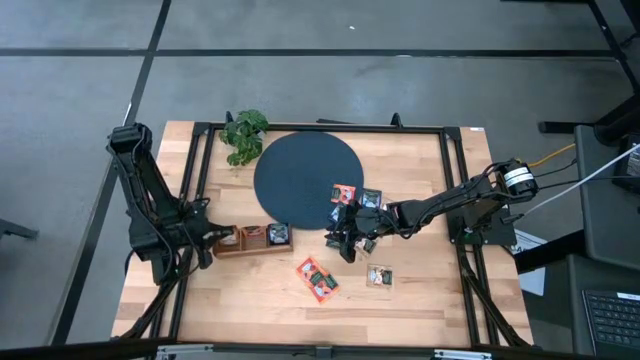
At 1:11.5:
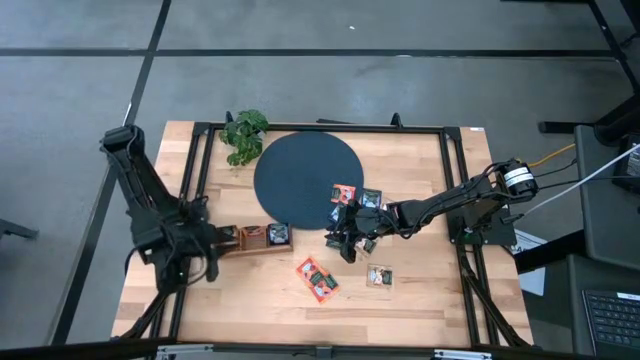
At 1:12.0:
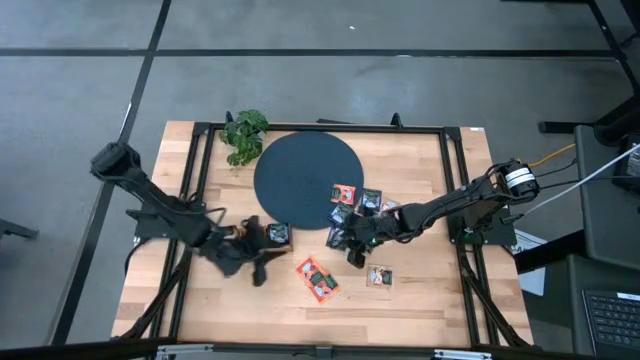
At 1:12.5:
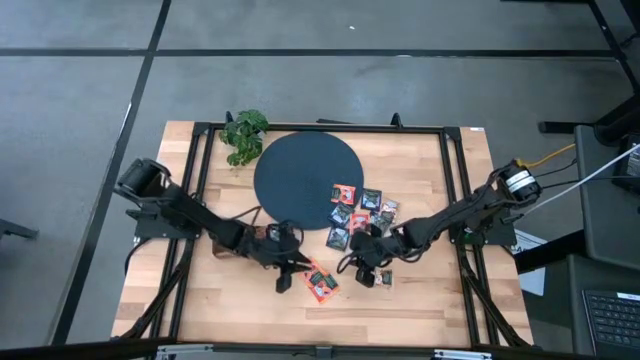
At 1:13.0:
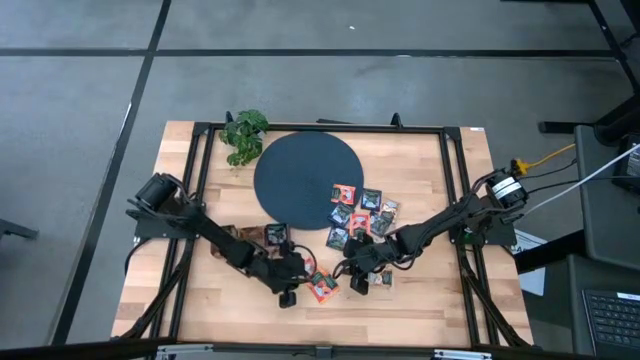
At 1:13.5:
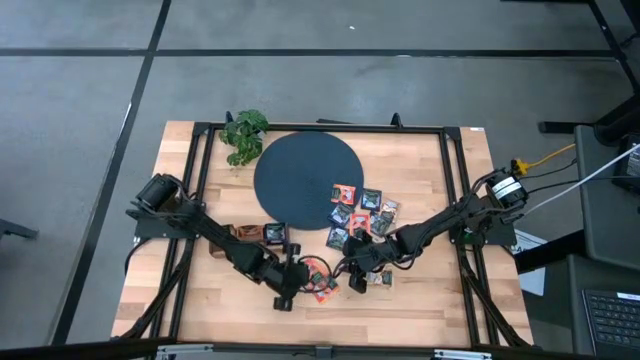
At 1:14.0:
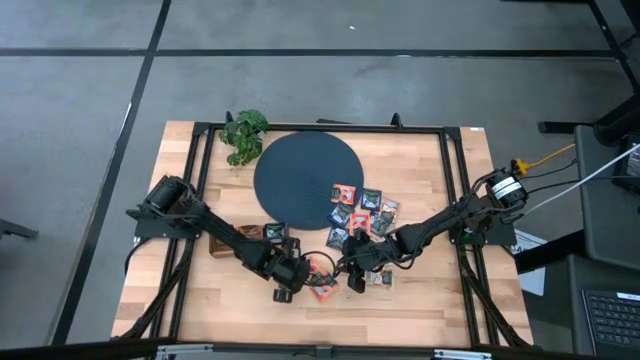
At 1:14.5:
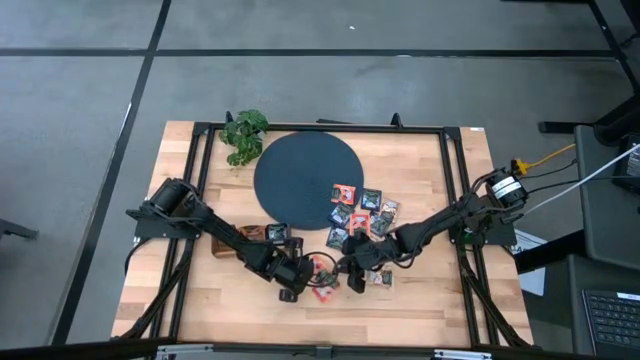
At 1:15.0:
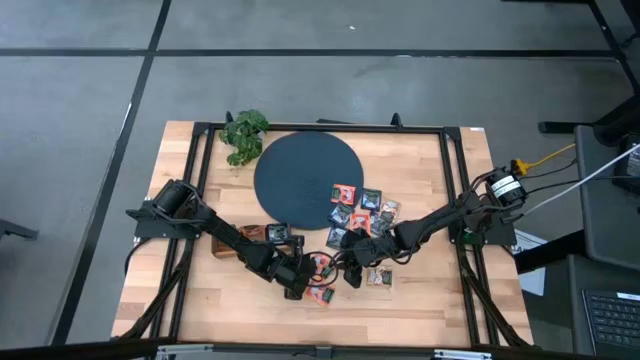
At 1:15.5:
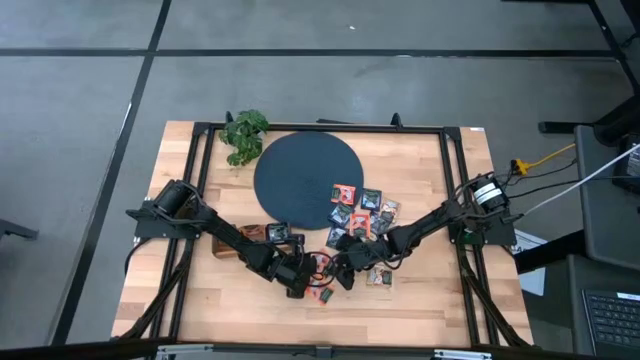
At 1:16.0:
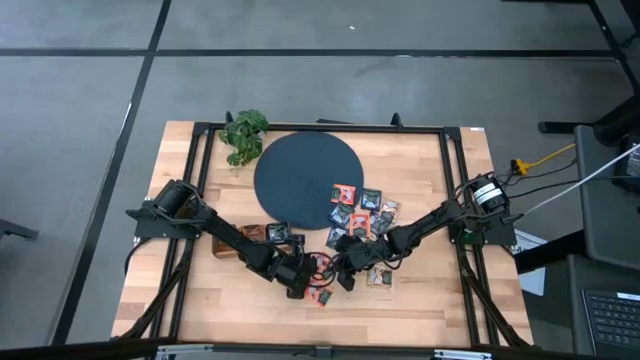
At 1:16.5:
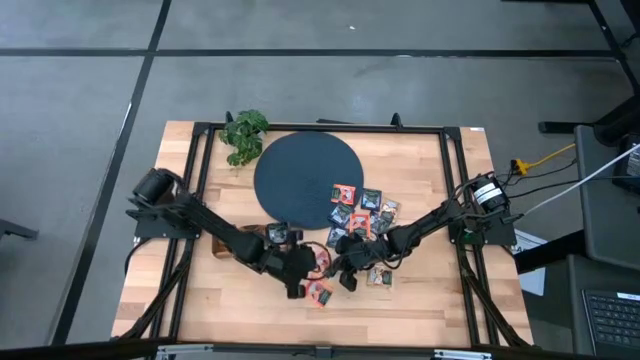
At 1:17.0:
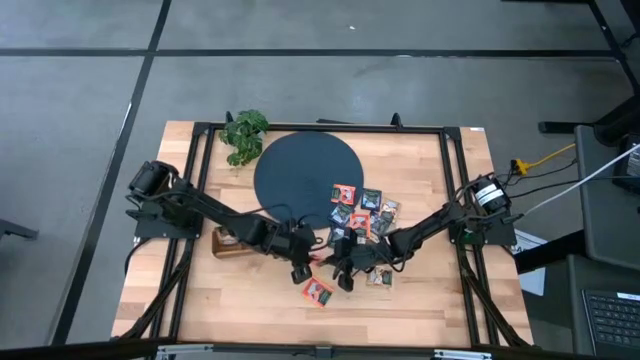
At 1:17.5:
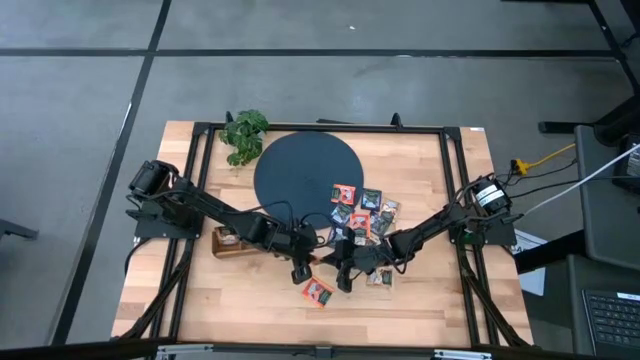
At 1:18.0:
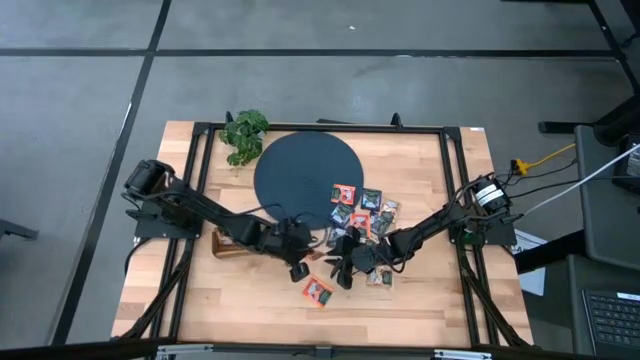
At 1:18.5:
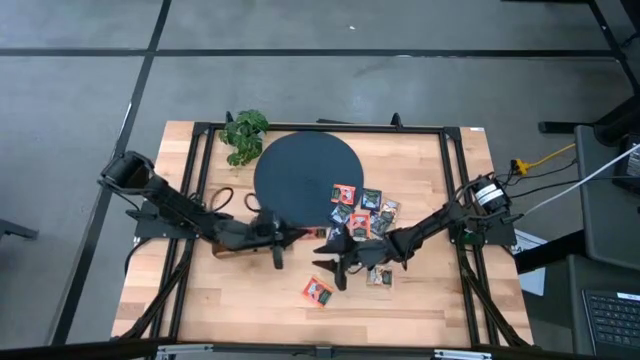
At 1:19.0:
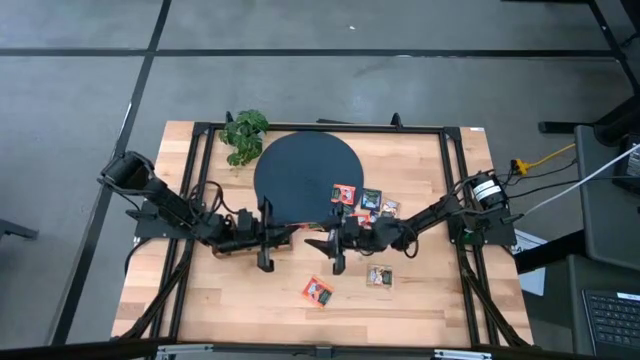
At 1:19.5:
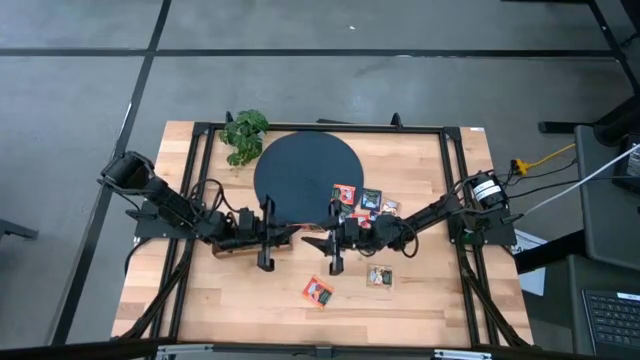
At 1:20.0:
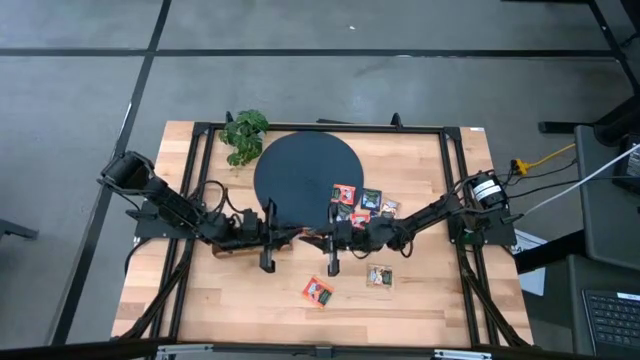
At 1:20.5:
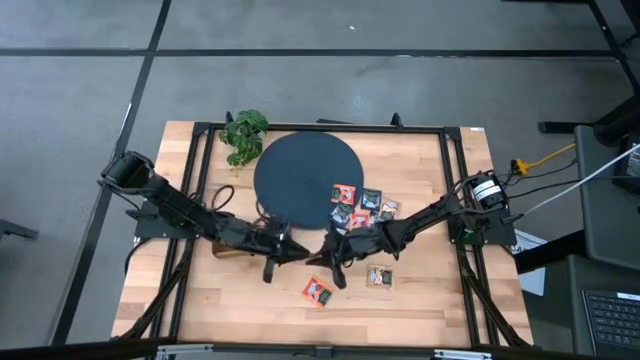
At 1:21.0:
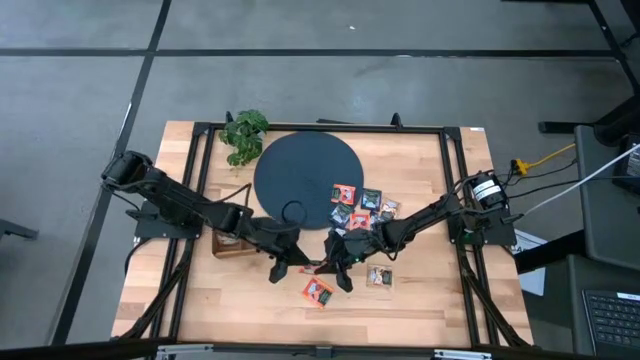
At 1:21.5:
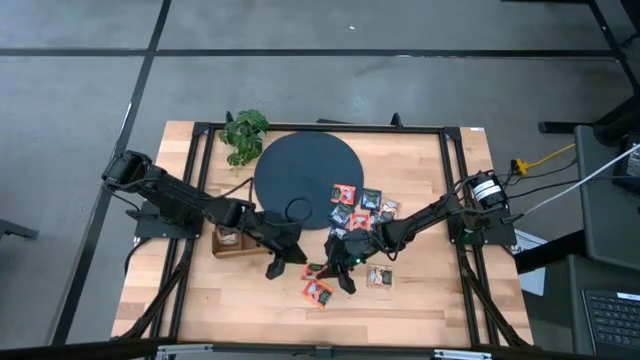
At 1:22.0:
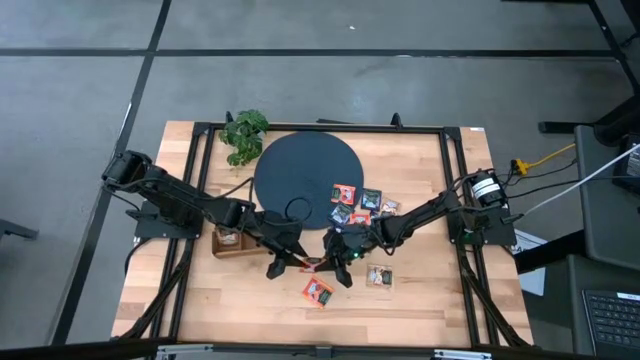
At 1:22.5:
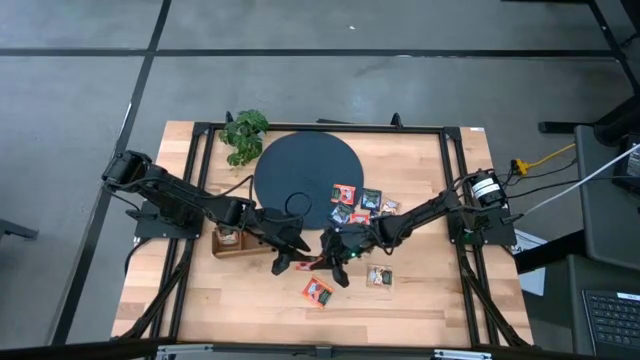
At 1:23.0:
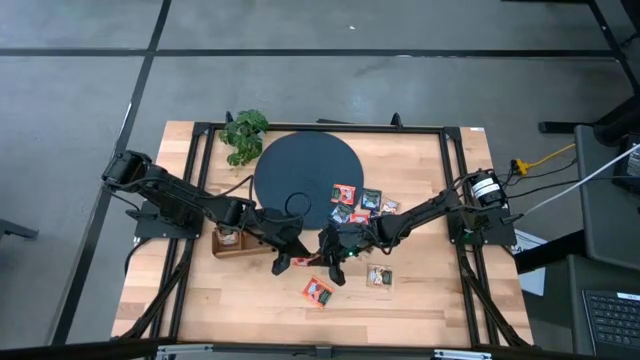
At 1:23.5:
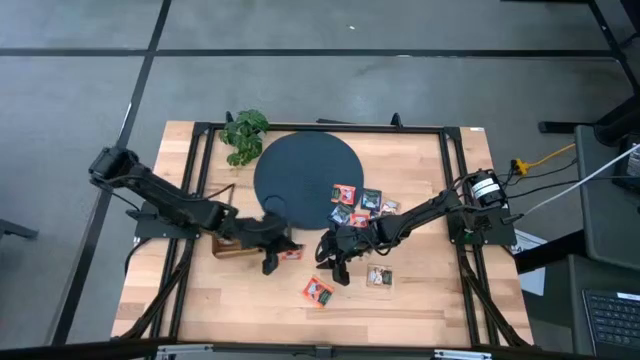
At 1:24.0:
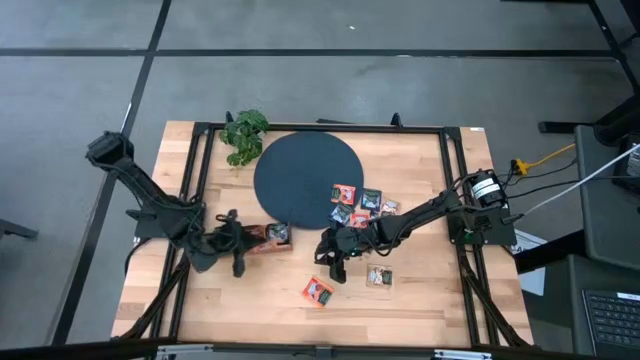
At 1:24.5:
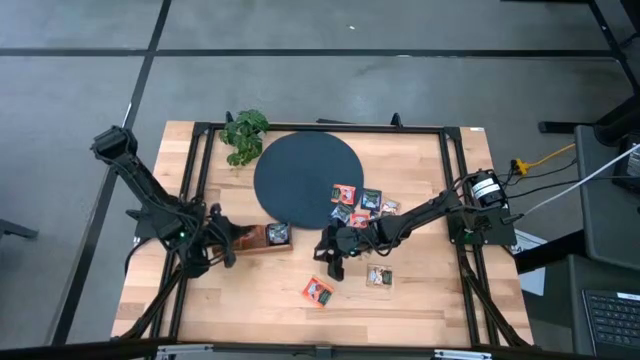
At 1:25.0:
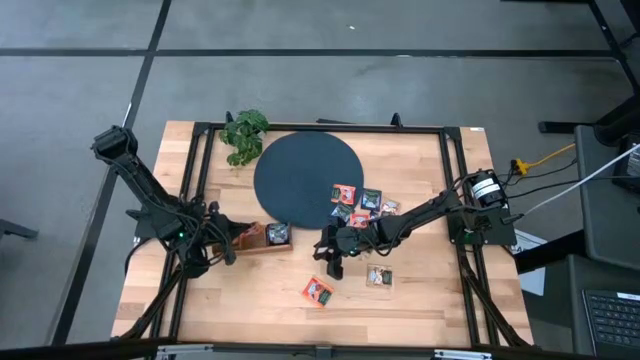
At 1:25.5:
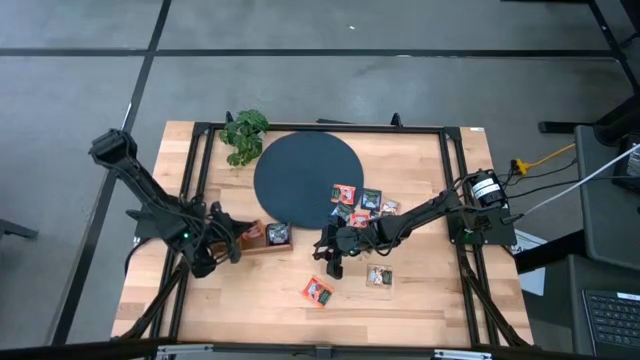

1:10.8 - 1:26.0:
Task: Pick & Place Tea
Put the orange tea bag into the middle section of the wooden organizer
